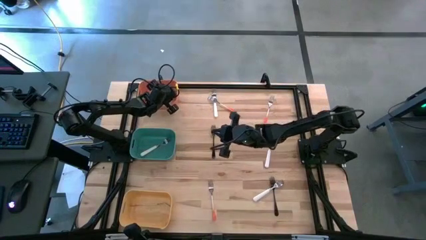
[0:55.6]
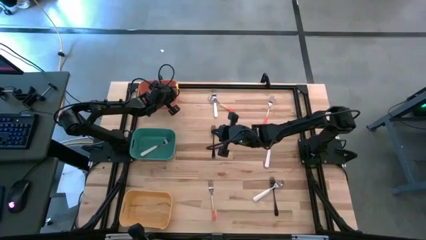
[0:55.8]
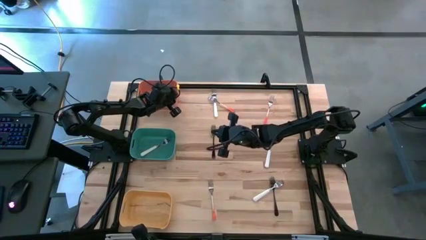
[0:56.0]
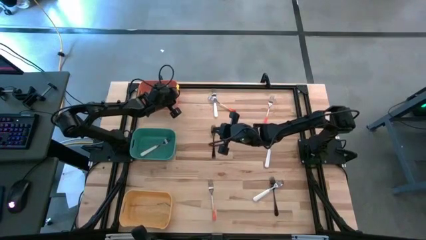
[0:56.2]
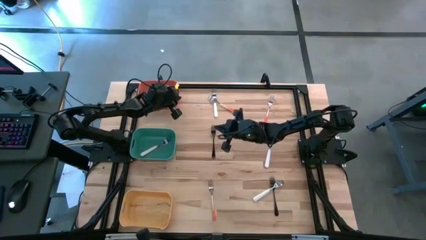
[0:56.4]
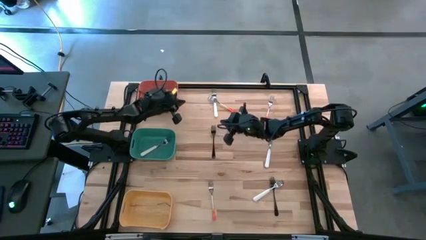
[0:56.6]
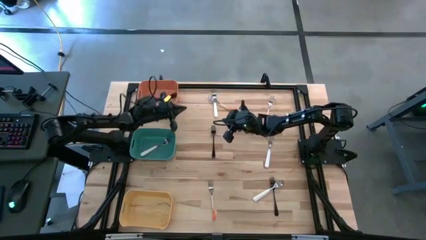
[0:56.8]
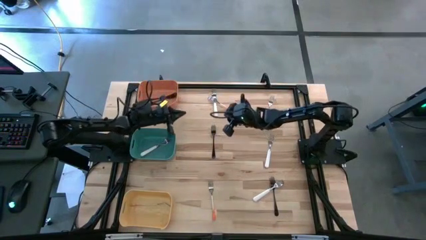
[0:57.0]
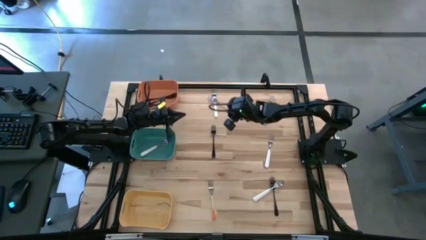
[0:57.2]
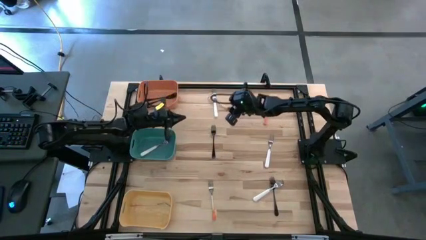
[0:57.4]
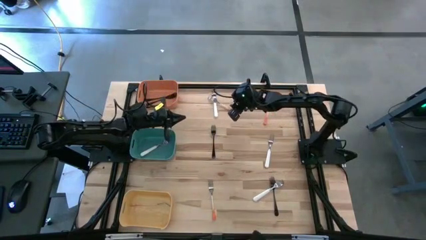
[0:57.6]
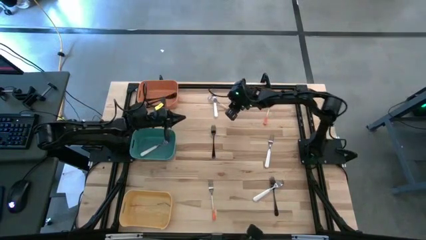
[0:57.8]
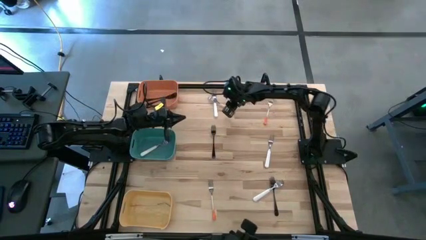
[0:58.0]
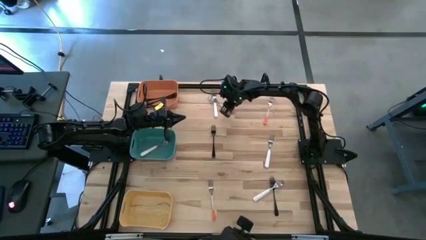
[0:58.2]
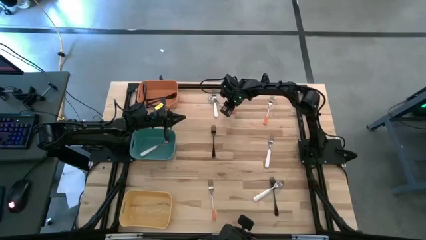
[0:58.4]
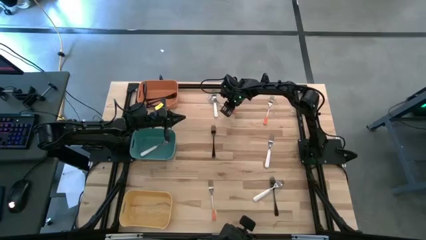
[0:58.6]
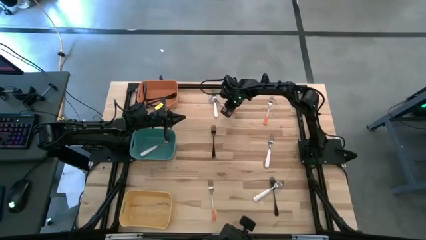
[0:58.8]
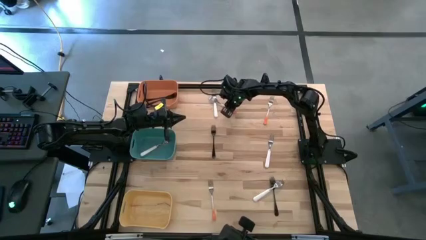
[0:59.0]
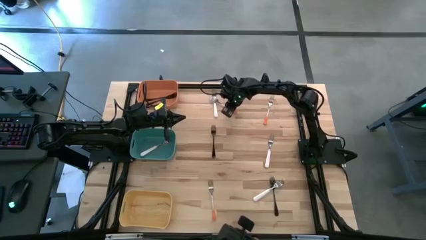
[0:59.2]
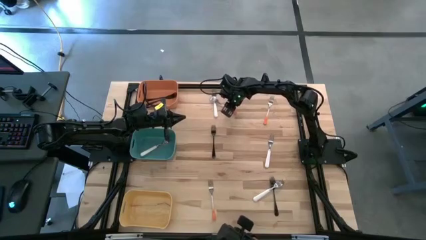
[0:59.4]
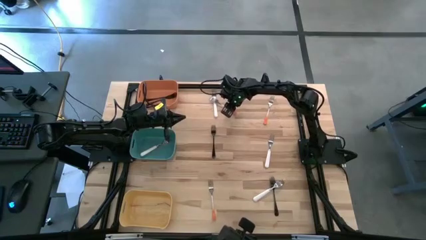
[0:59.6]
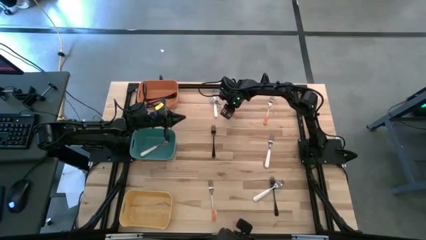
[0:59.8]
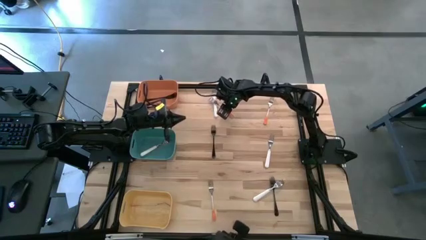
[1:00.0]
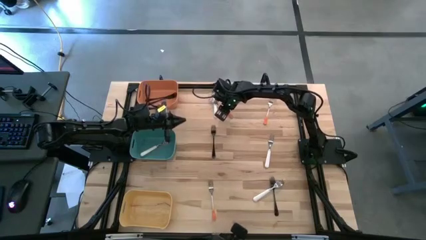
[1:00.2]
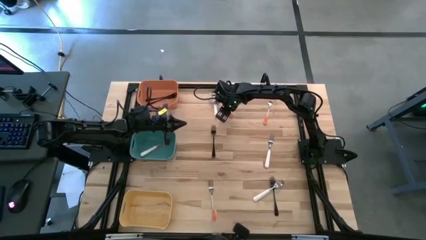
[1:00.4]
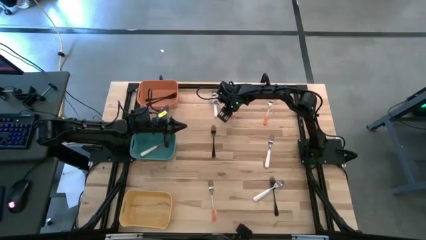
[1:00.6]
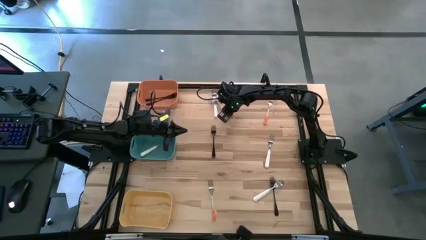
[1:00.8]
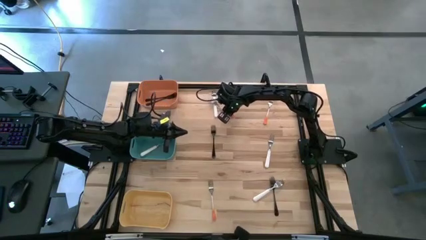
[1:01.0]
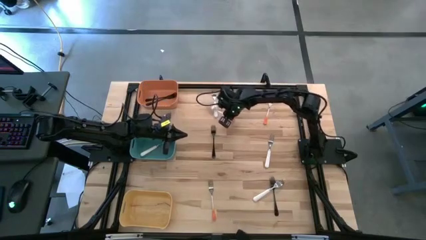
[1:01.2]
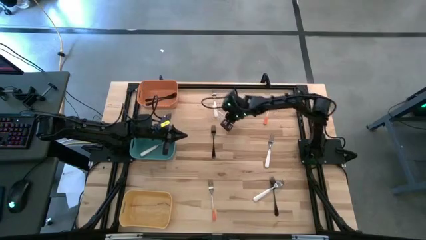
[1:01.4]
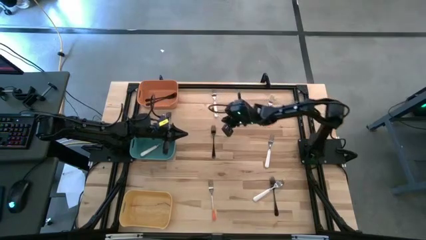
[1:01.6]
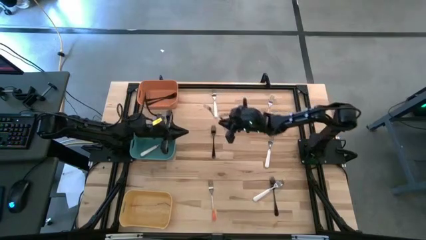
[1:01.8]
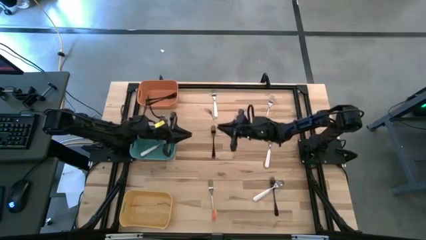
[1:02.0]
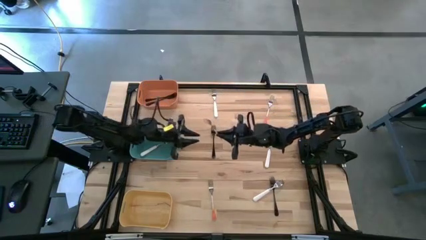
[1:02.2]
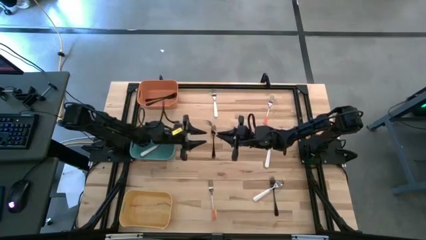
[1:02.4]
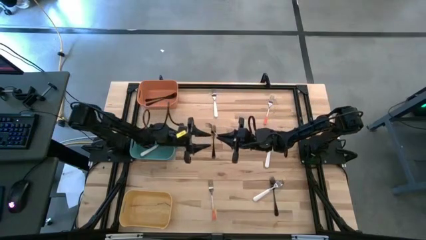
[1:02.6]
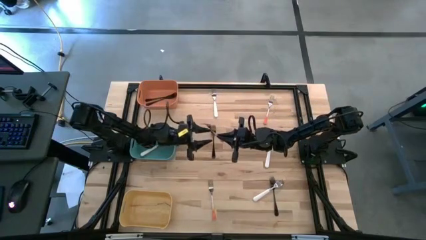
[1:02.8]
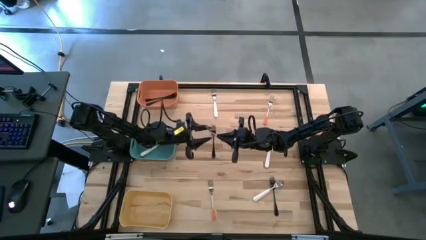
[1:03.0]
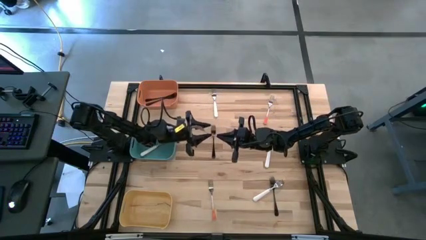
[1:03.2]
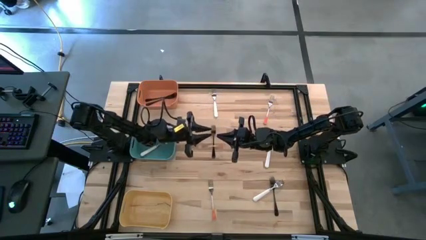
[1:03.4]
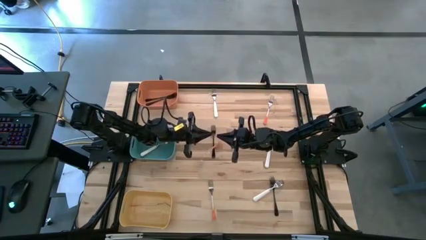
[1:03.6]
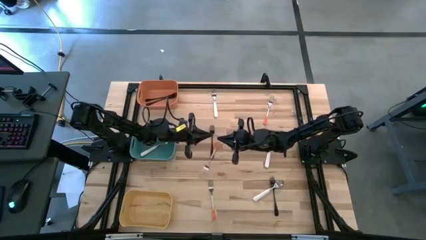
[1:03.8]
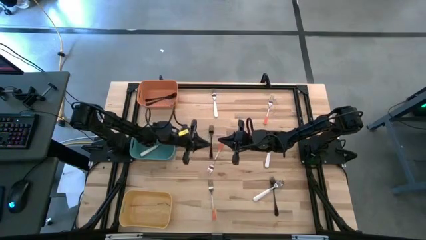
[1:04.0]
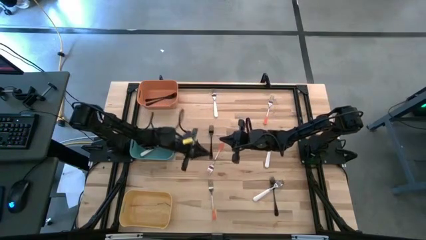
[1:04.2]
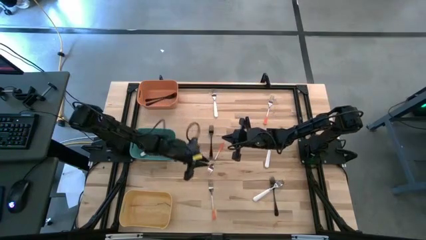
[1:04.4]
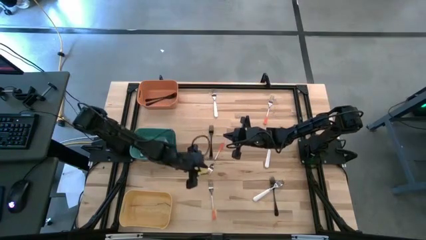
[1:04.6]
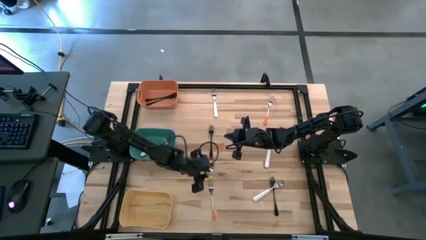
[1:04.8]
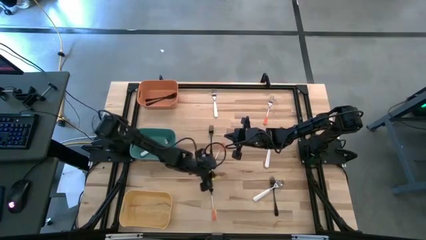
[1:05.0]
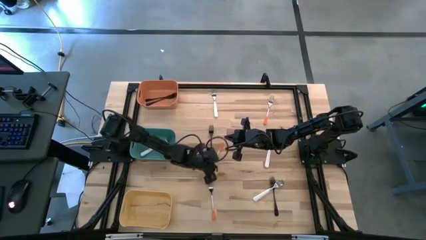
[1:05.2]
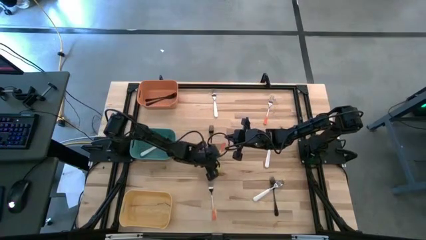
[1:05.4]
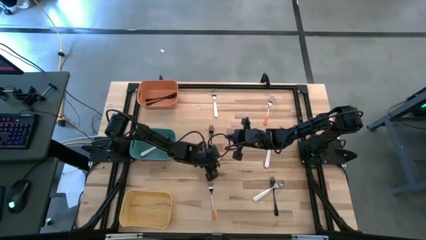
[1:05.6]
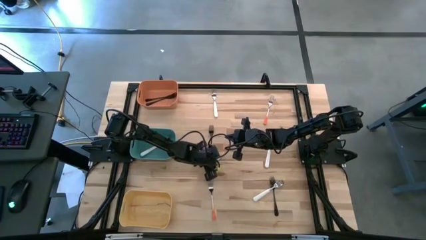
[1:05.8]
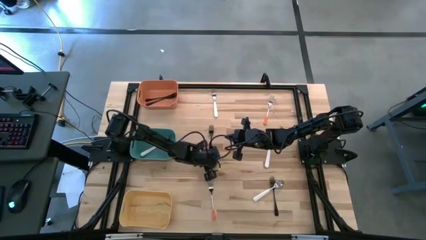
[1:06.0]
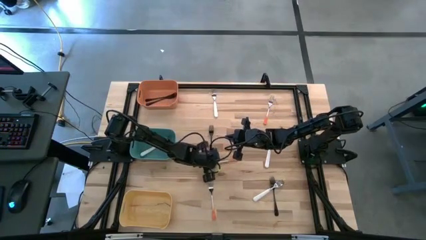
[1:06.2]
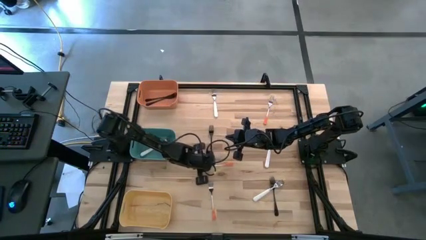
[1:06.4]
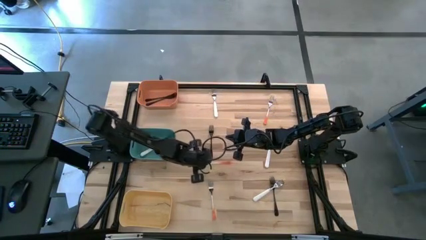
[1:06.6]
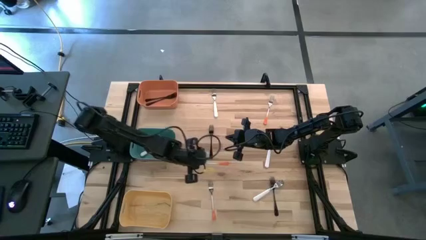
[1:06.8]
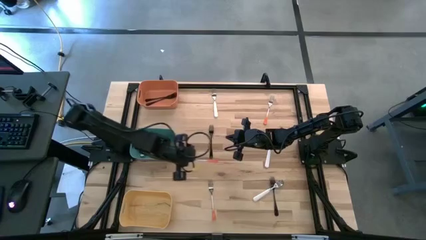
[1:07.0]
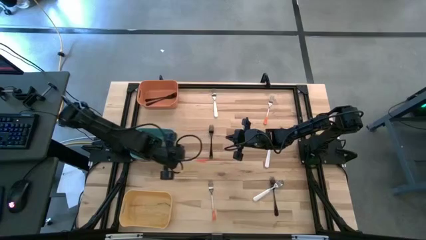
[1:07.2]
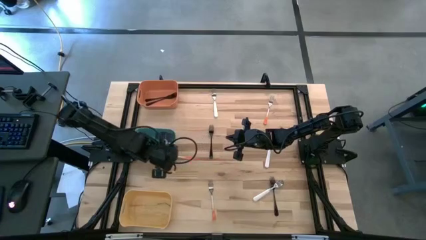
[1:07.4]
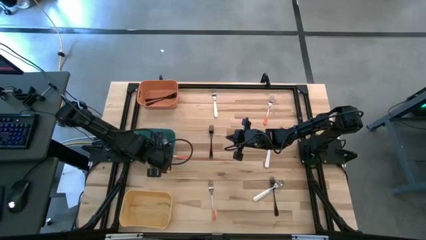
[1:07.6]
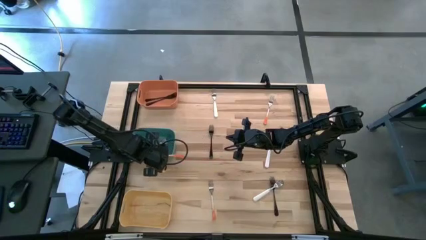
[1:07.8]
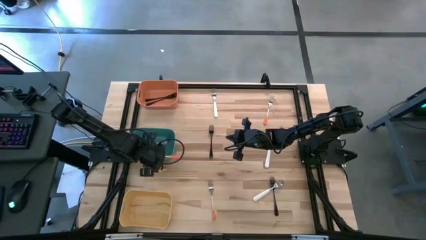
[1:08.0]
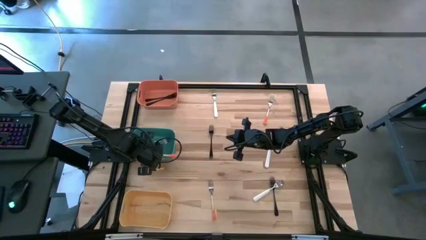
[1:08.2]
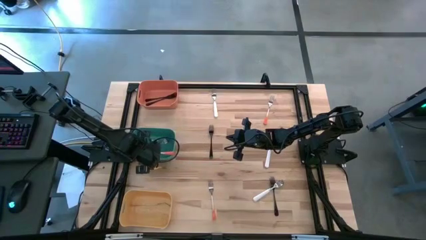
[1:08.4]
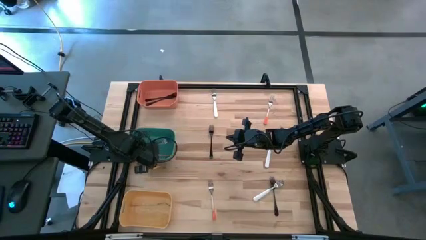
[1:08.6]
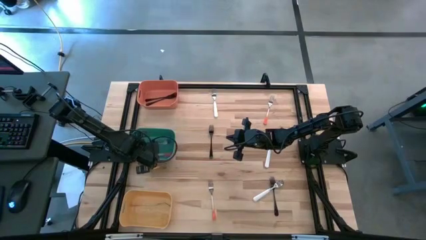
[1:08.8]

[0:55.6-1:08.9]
Task: Sort silverware by color (type)
Put the orange fork into the yellow bin

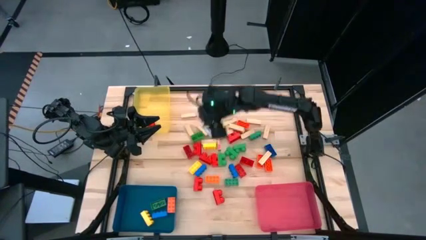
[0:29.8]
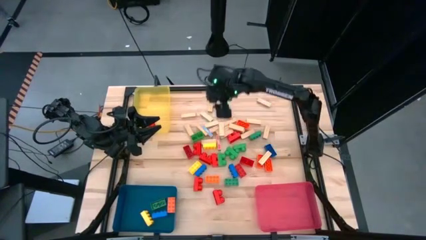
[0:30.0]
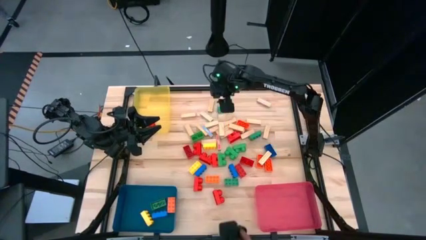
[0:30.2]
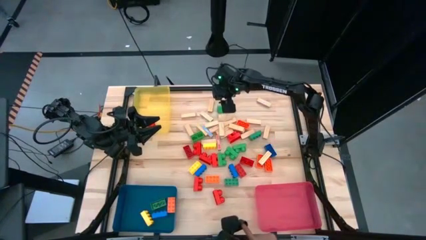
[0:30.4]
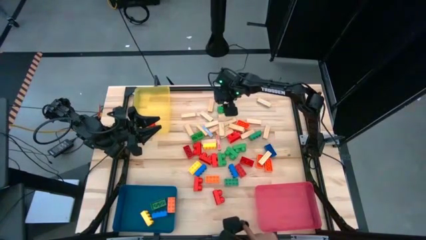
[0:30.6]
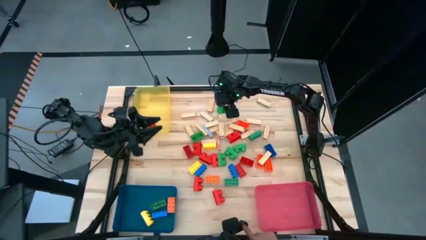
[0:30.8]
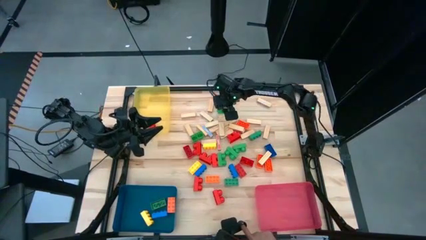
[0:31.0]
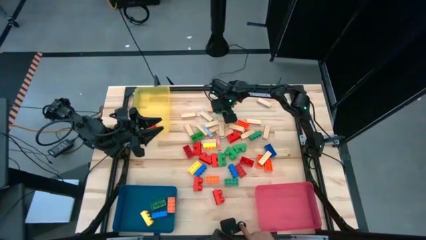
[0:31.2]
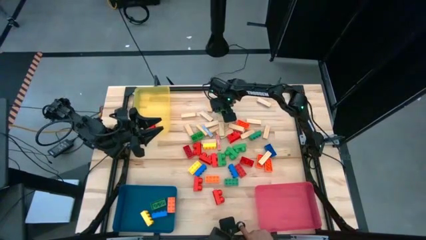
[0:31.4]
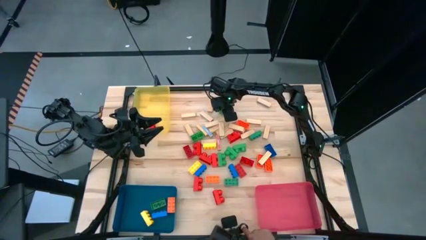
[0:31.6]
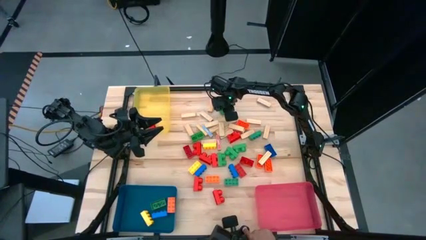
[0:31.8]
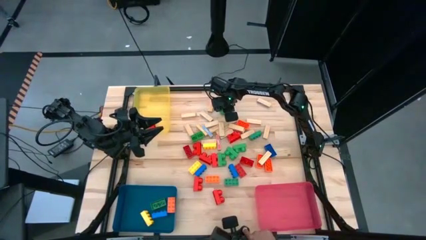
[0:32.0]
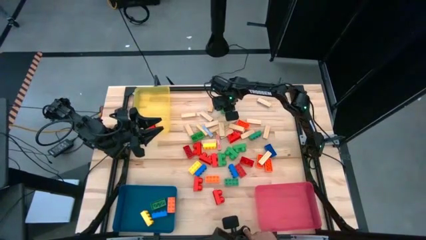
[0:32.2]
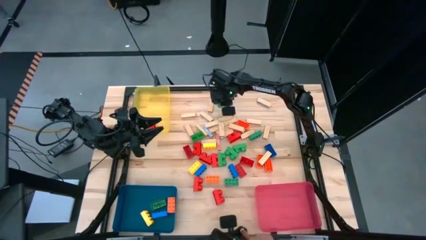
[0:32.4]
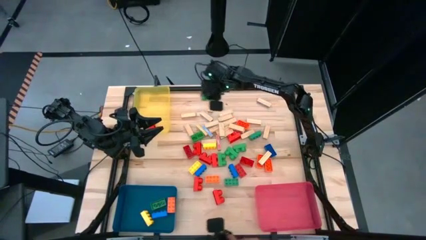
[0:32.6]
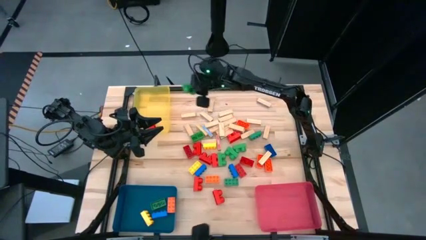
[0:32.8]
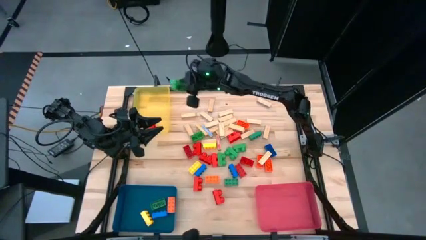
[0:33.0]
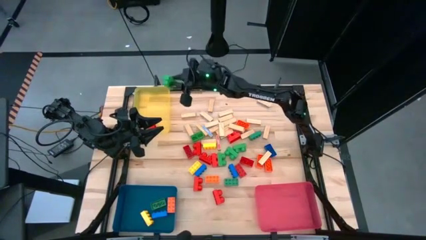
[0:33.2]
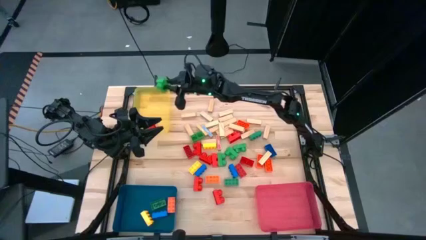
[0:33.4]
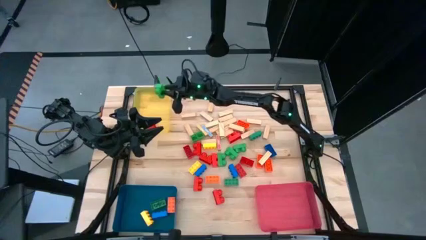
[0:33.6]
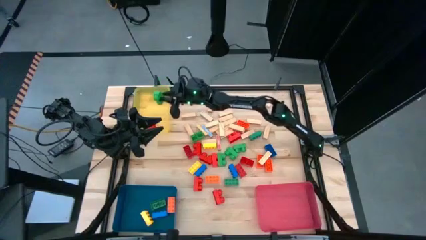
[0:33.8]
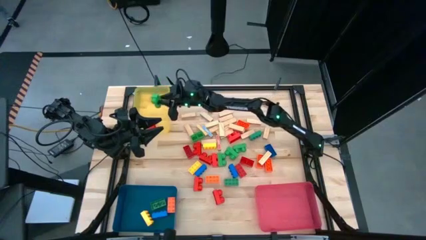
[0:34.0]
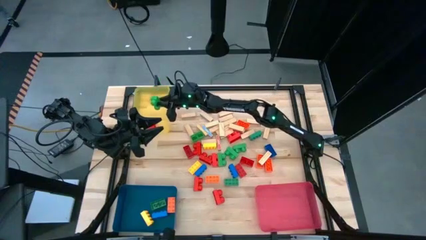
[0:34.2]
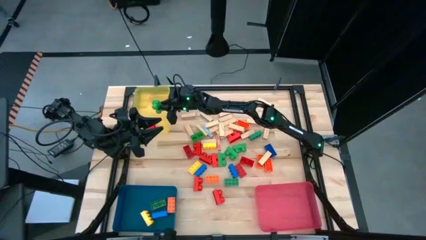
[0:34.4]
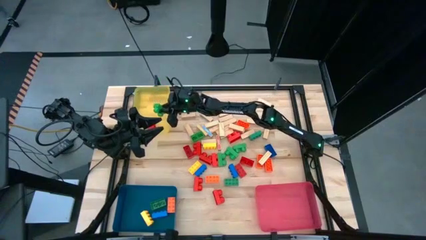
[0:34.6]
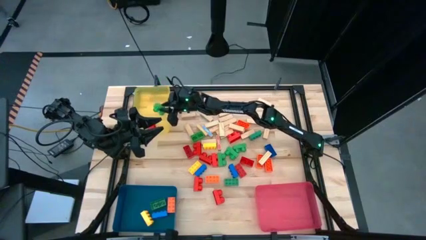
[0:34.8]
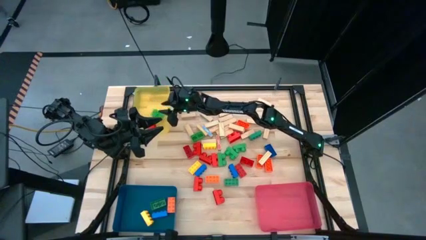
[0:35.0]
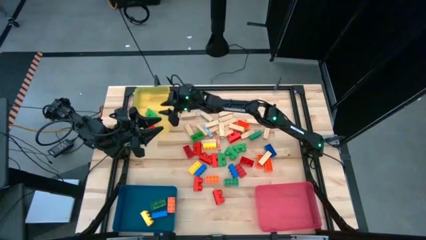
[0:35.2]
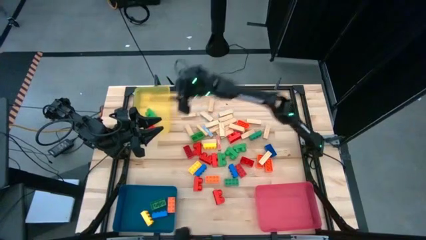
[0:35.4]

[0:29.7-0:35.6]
Task: Sort blocks by size
Put the round green game piece into the yellow bin
